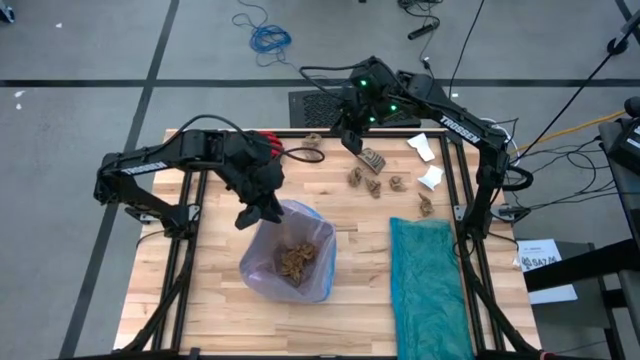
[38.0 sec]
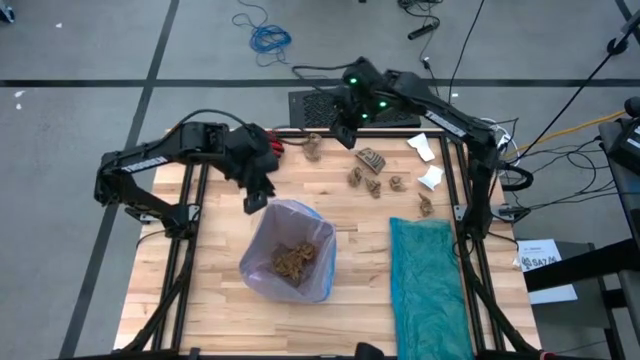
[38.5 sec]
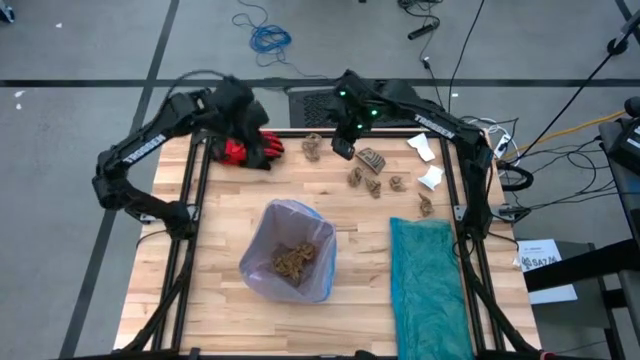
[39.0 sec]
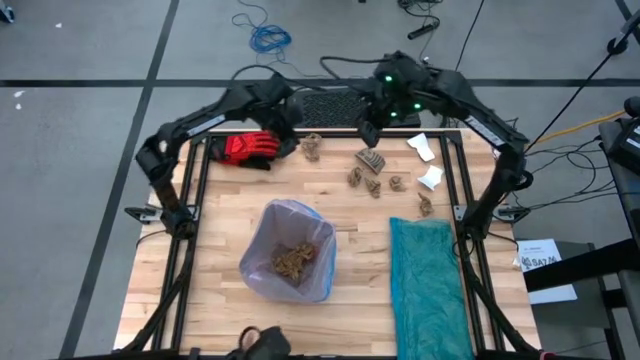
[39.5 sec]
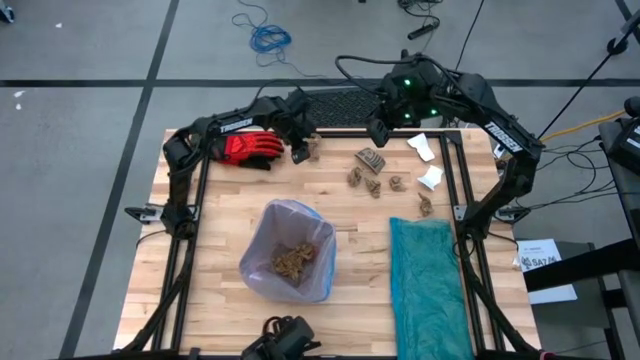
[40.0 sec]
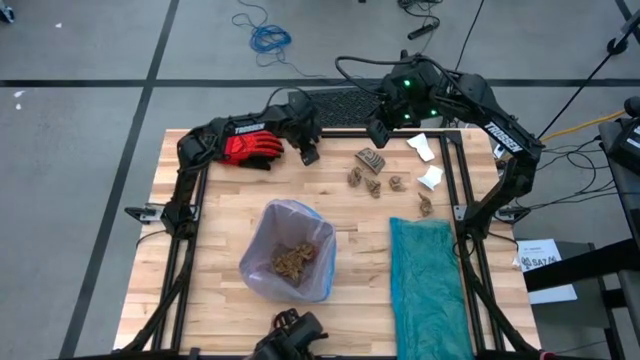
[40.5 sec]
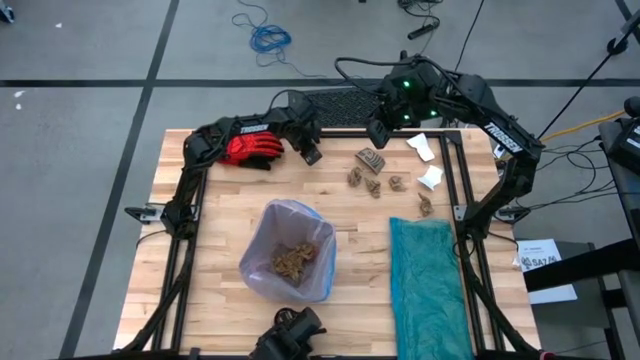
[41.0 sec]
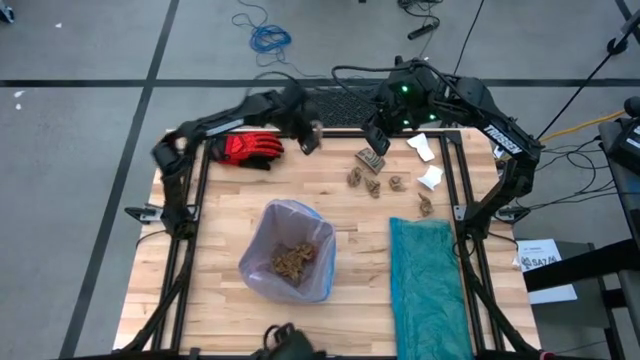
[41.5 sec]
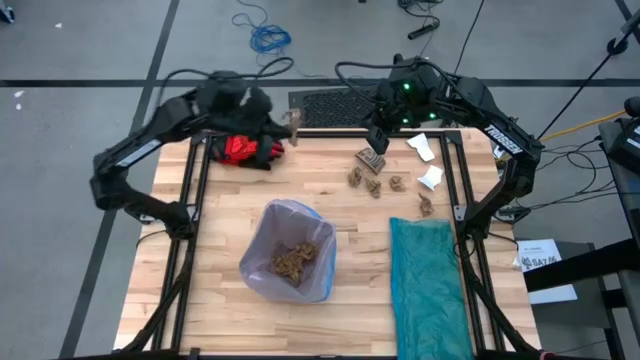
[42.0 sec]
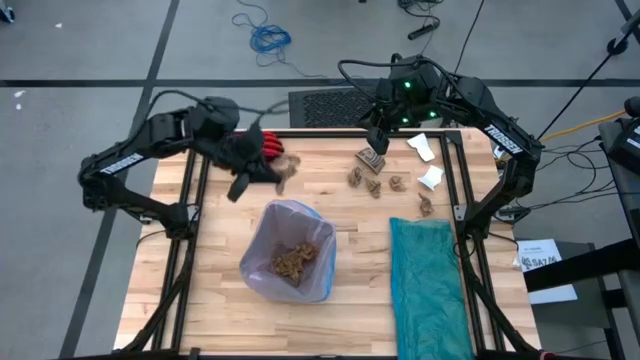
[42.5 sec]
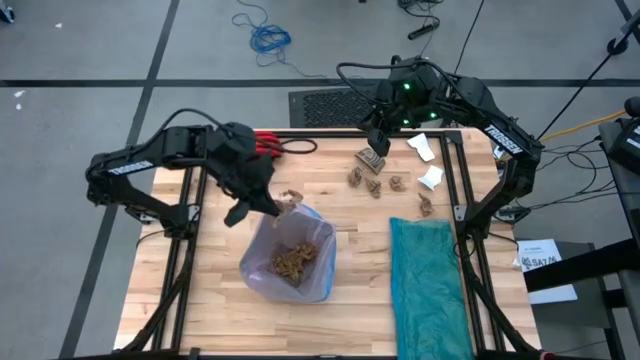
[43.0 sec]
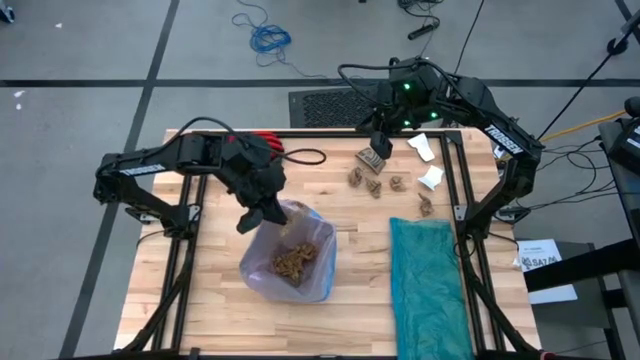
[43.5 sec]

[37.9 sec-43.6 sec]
Task: place trash/remove bag and relplace
Put the brown napkin into the trash bin

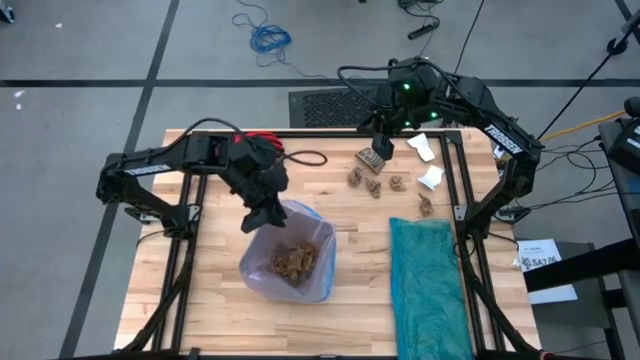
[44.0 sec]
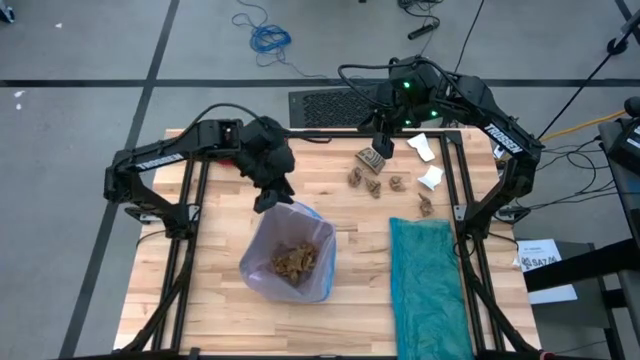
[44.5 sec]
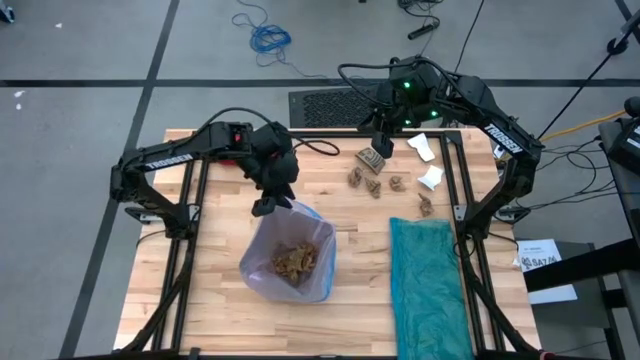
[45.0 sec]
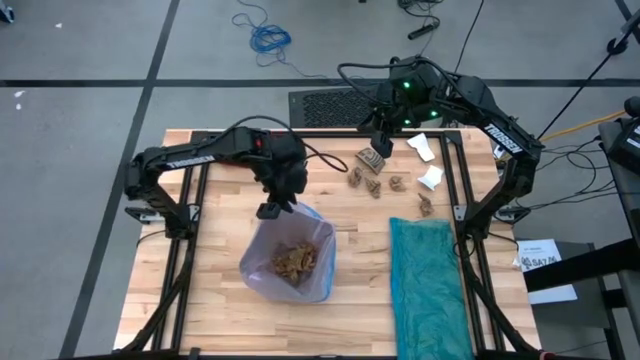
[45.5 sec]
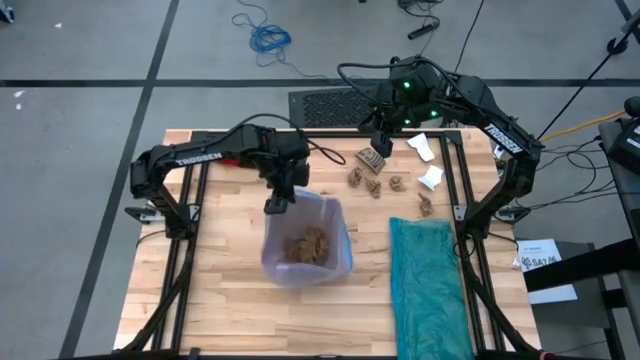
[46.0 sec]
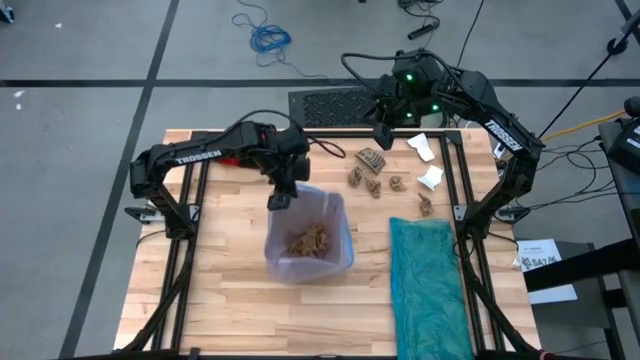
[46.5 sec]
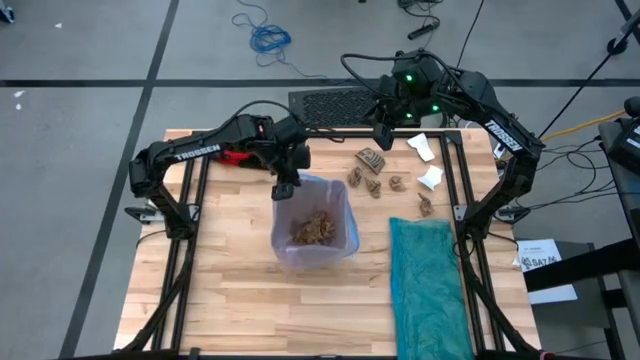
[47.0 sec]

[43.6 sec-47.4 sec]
Adjust the trash bin

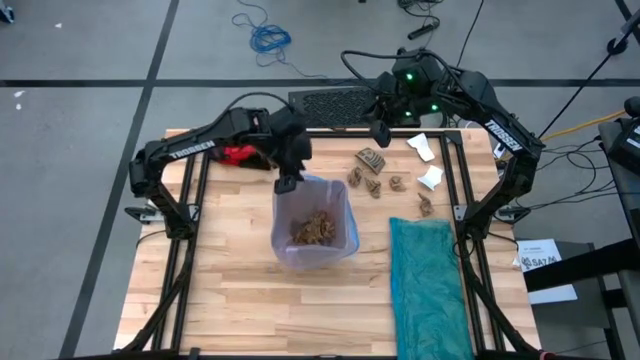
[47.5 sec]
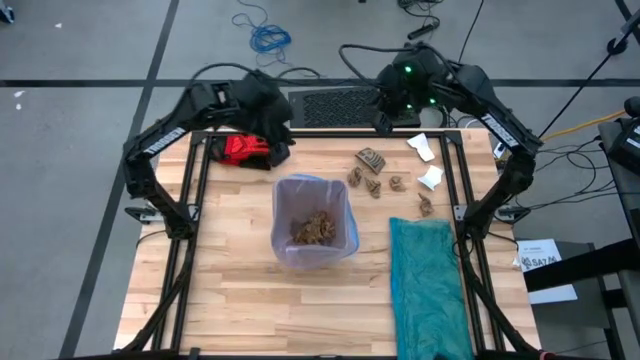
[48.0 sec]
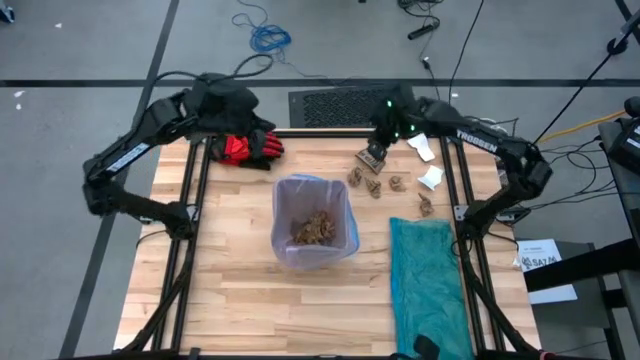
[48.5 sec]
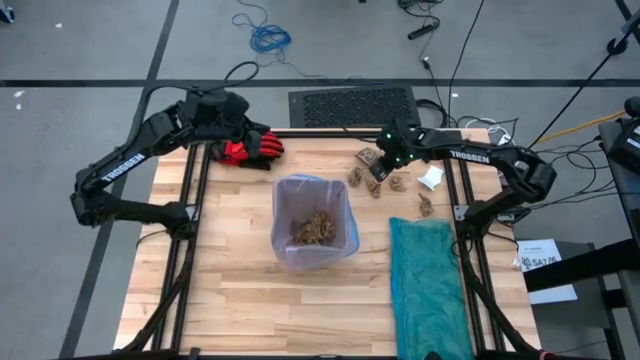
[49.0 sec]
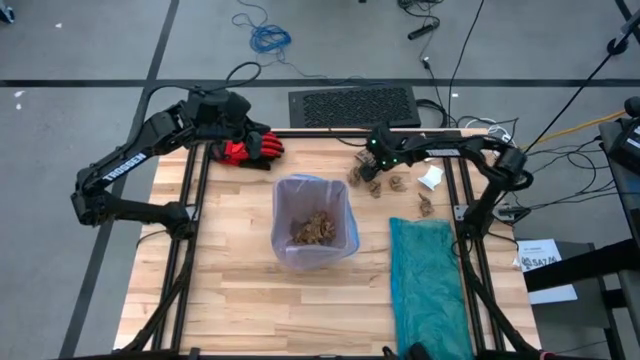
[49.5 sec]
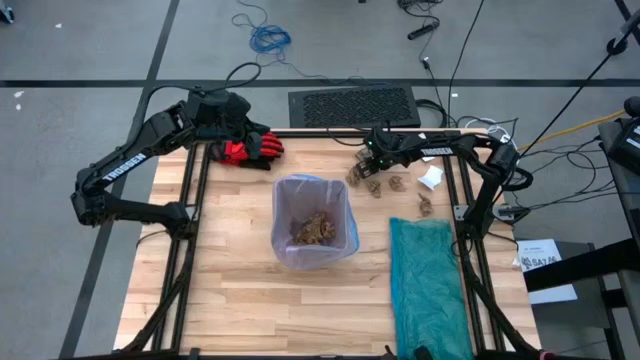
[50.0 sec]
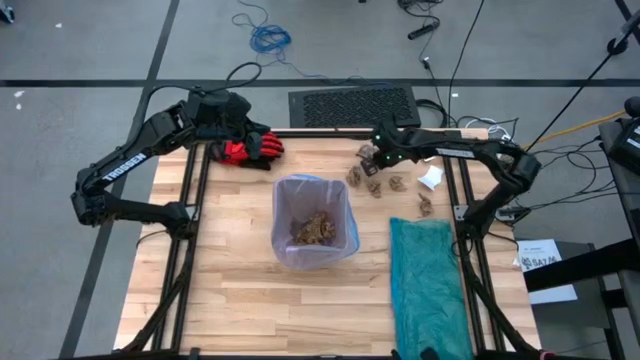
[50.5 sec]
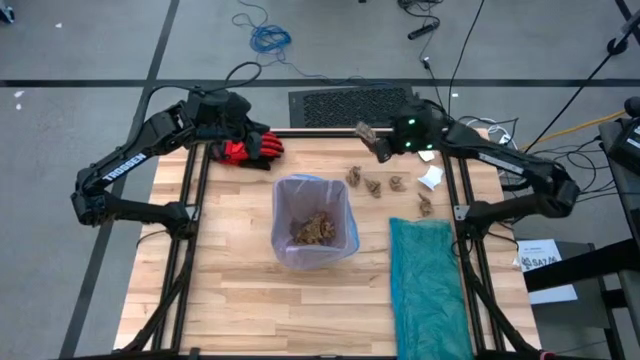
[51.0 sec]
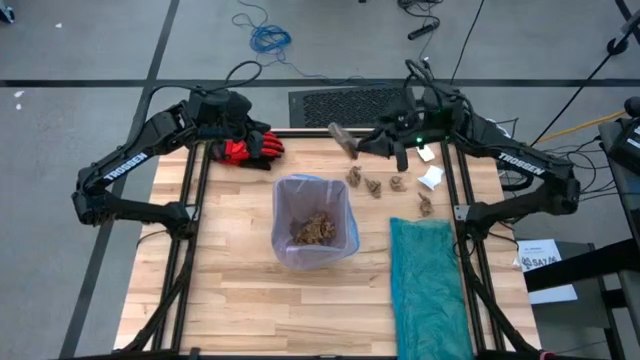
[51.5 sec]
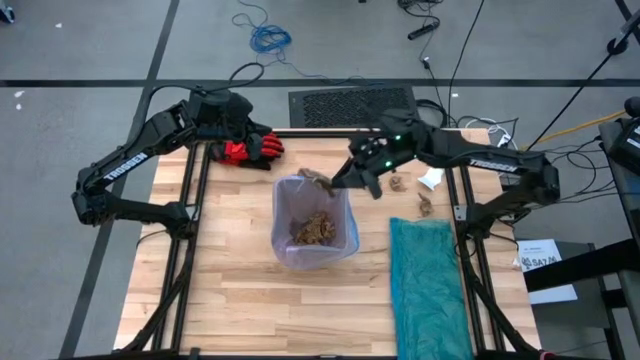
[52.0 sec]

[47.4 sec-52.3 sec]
Put the brown cardboard piece into the trash bin

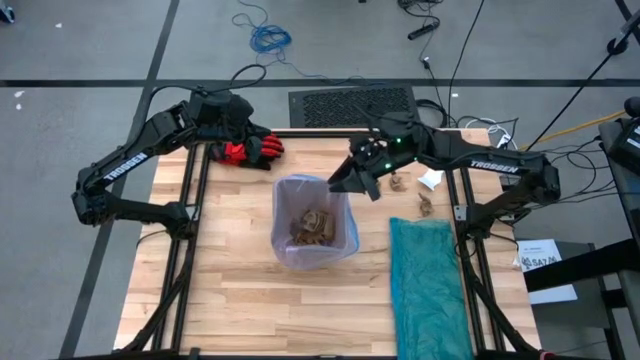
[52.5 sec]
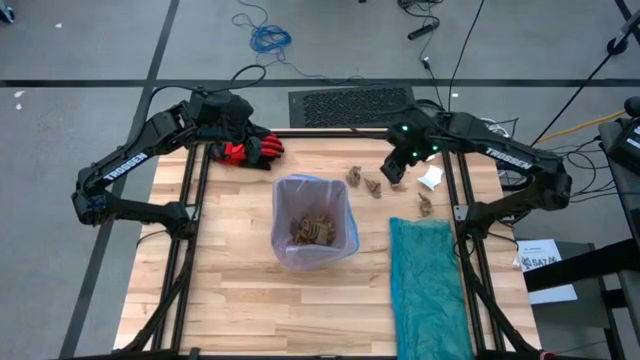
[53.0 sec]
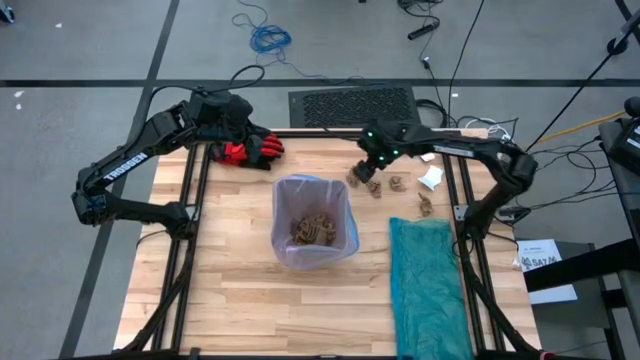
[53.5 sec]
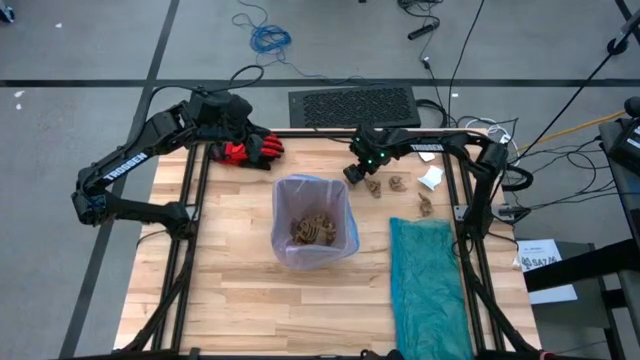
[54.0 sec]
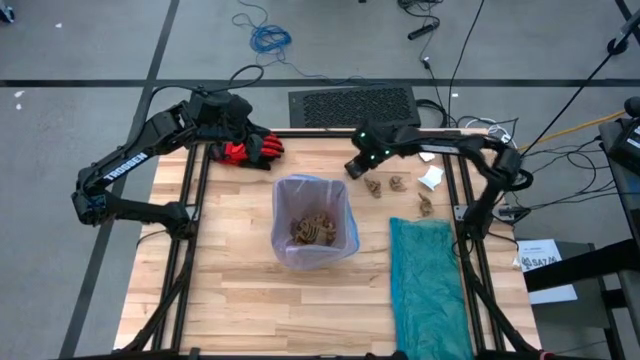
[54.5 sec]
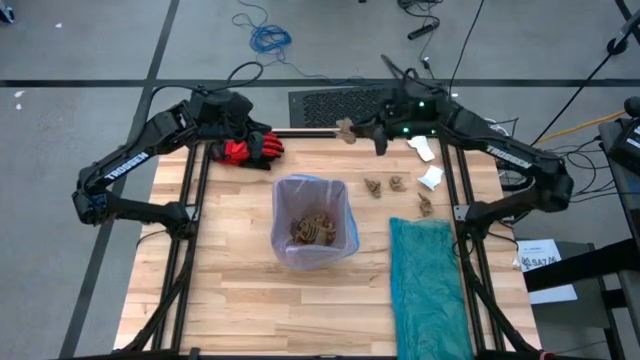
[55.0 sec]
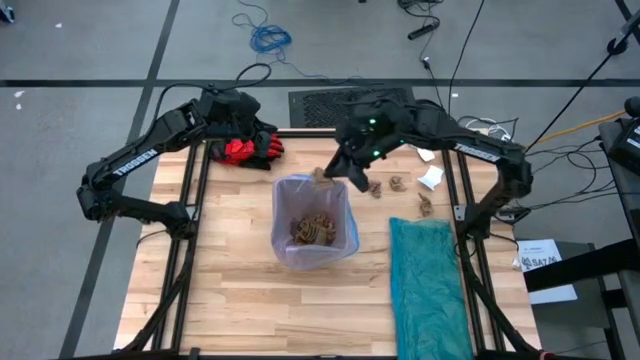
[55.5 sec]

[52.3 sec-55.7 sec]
Put the brown napkin into the trash bin

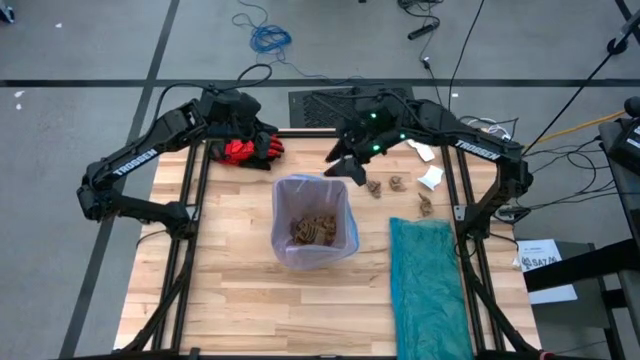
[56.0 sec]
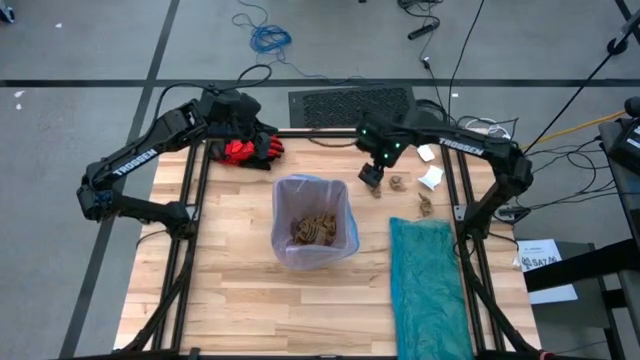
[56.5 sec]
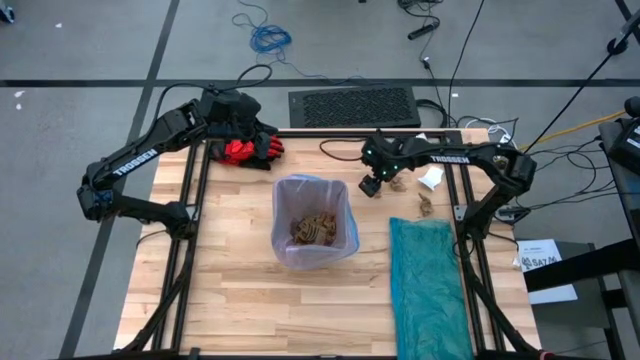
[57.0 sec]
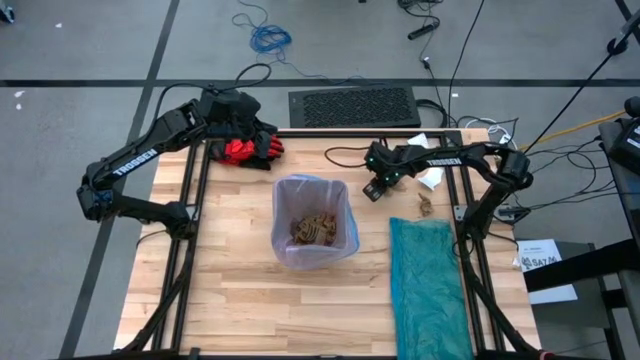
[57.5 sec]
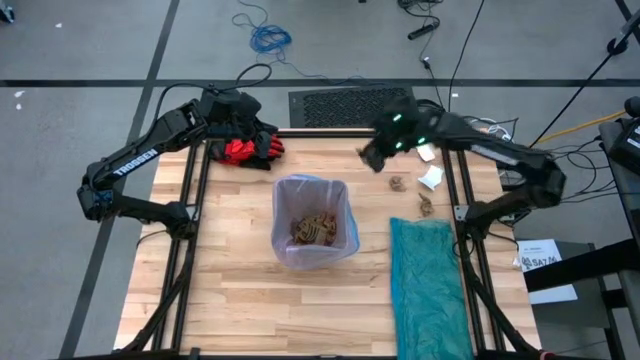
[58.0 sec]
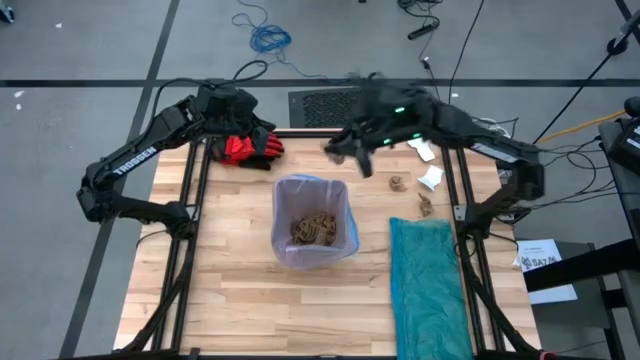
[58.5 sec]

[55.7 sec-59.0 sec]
Put the brown napkin into the trash bin
